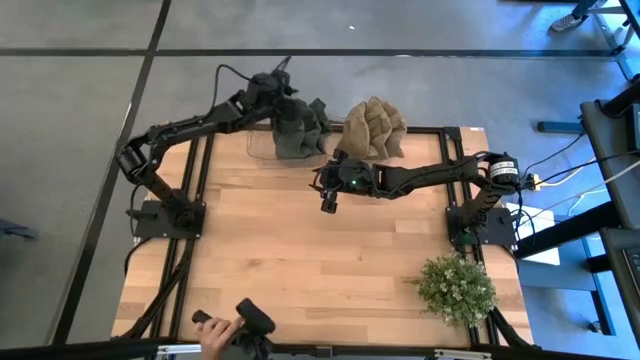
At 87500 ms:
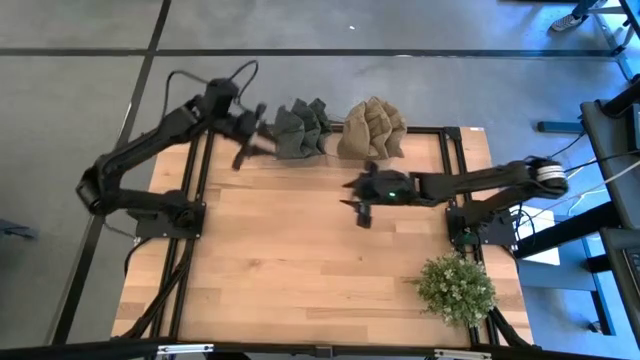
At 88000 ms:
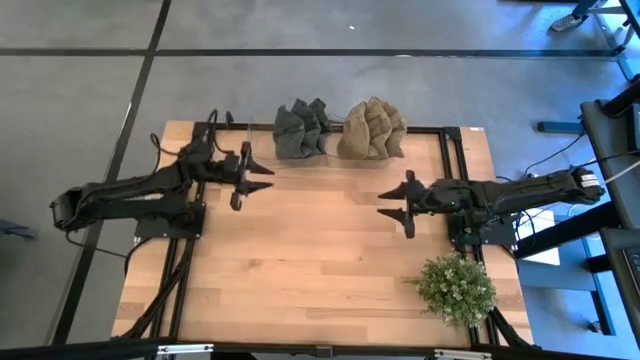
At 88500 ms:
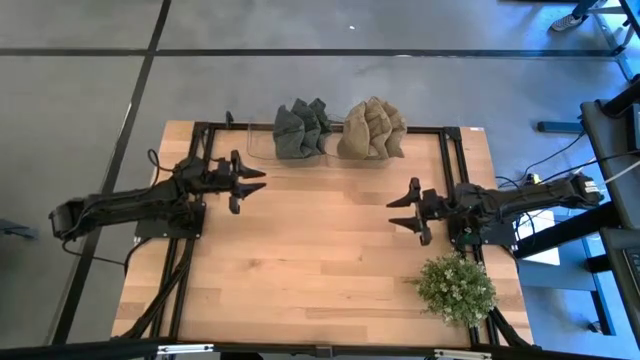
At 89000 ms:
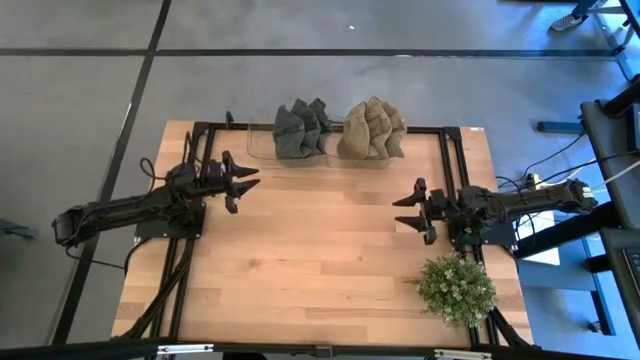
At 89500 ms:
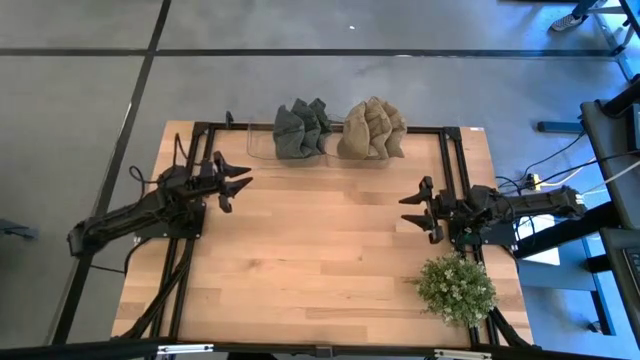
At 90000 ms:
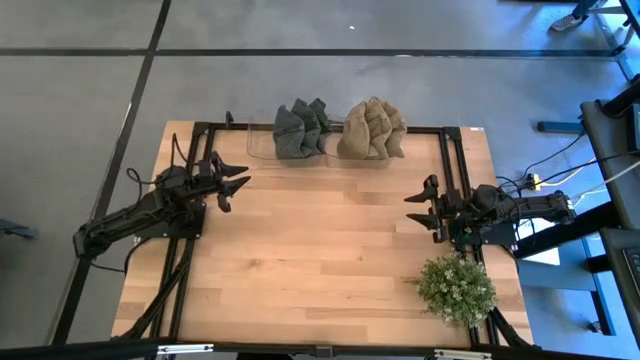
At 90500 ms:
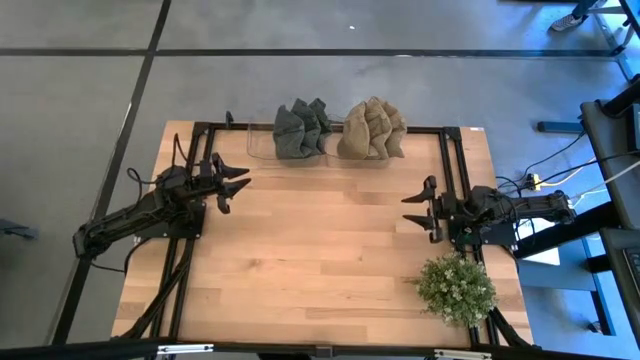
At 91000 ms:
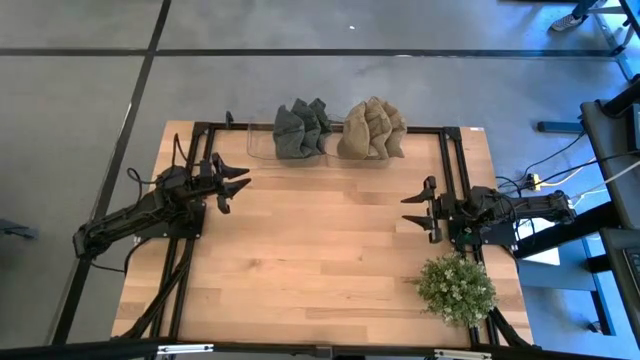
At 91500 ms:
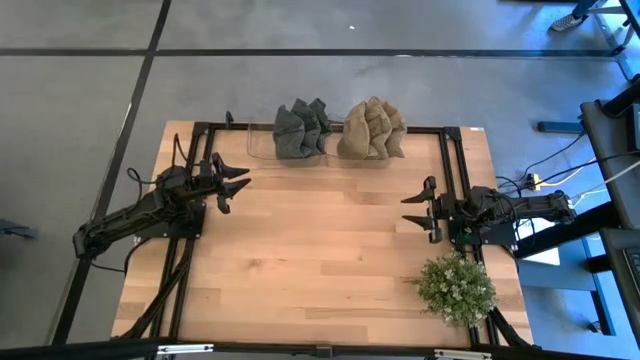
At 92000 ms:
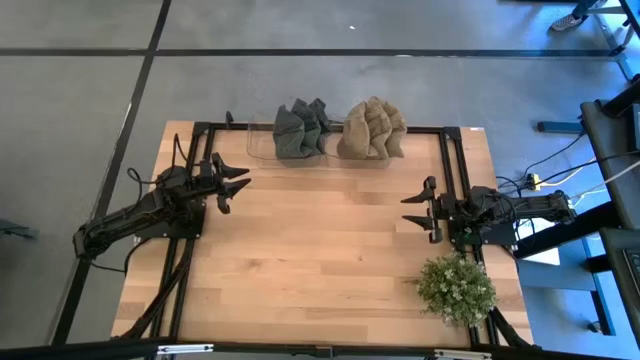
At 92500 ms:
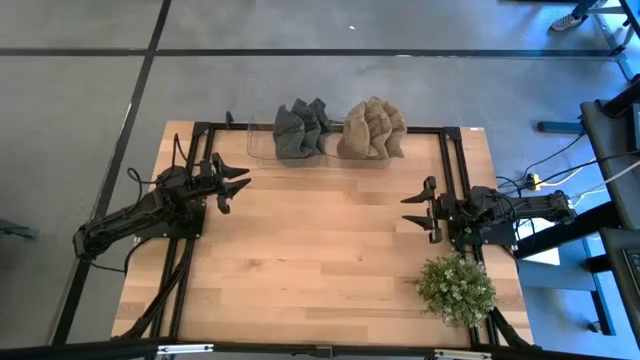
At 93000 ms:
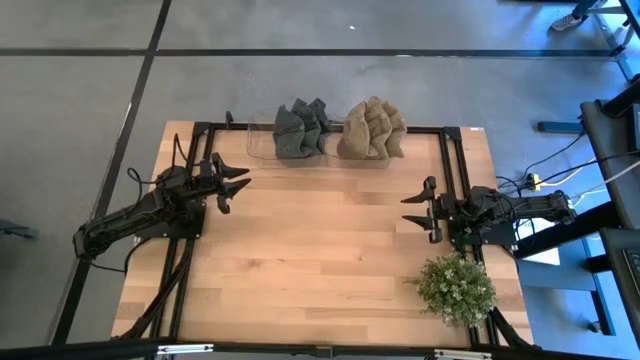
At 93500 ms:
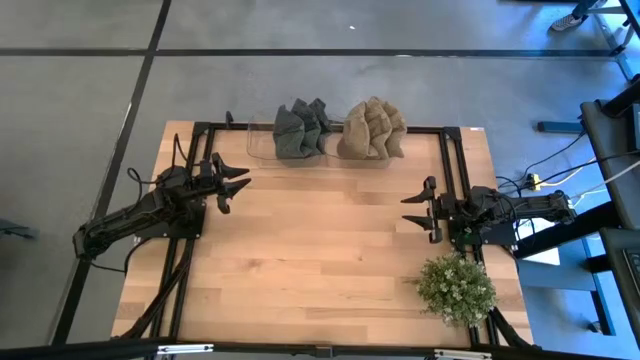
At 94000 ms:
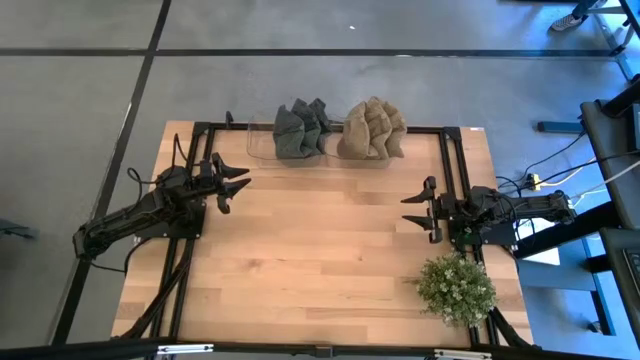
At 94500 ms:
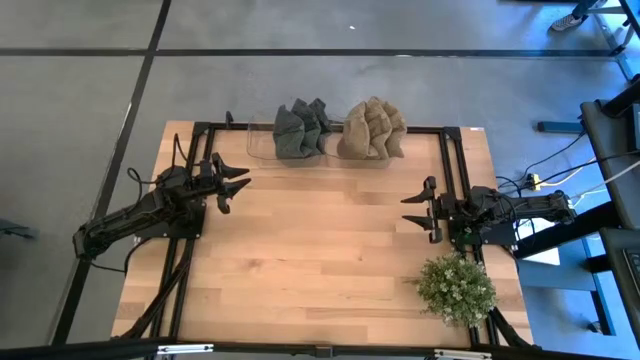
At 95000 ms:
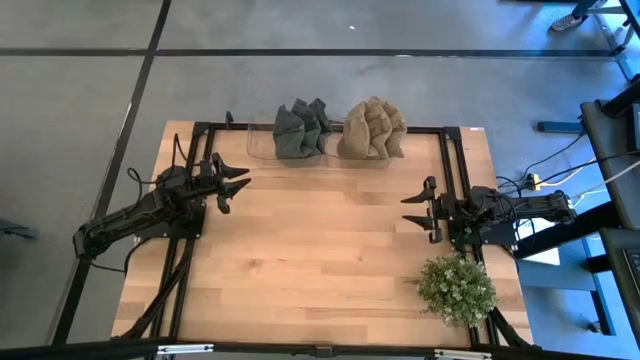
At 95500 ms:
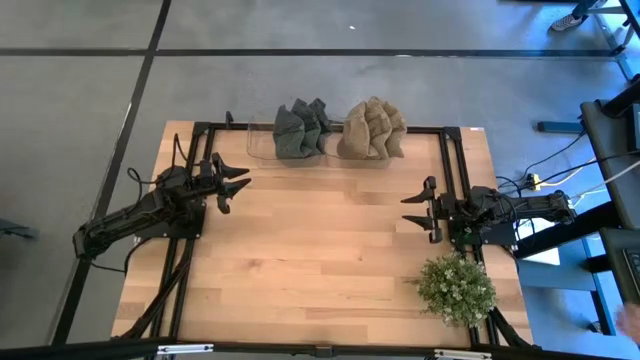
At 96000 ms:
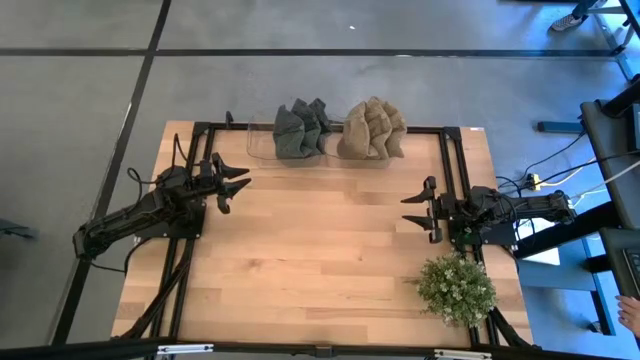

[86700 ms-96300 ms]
Task: Pick & Place hat
Return to Home Position

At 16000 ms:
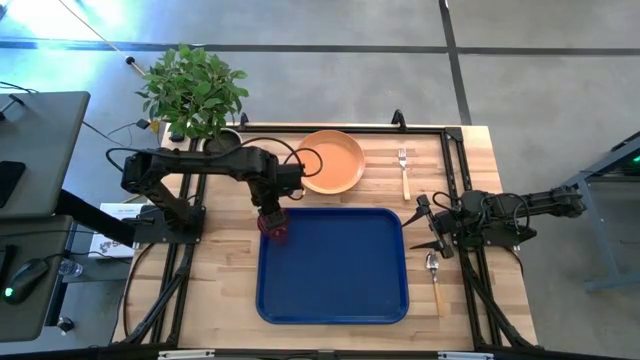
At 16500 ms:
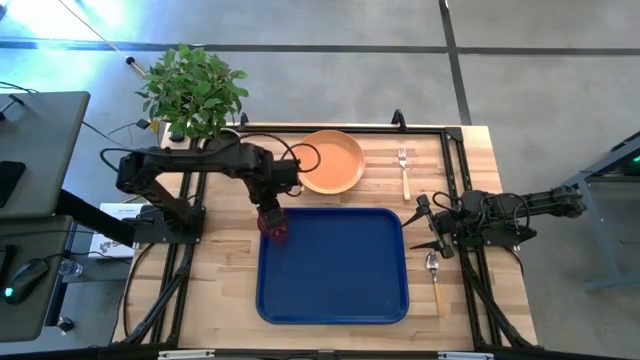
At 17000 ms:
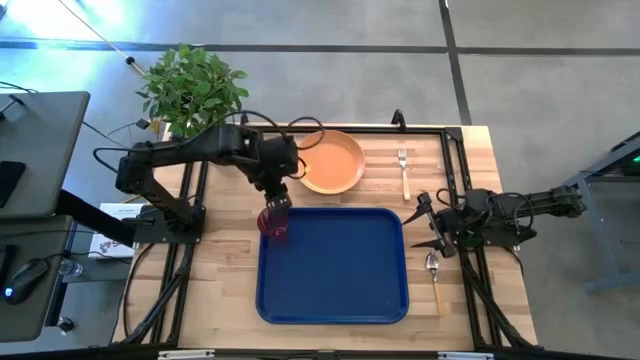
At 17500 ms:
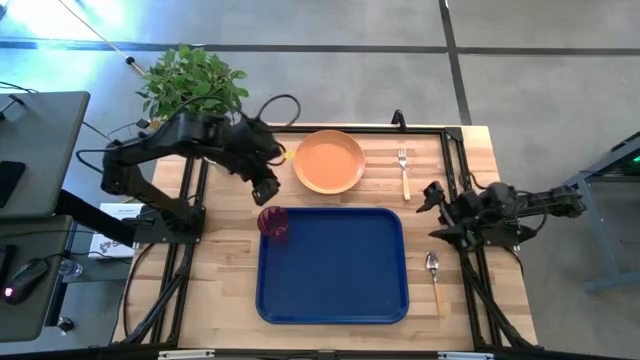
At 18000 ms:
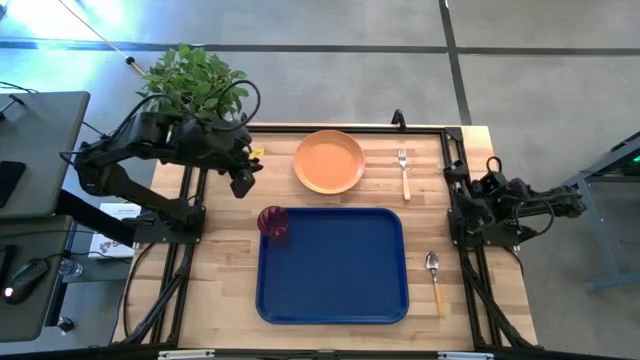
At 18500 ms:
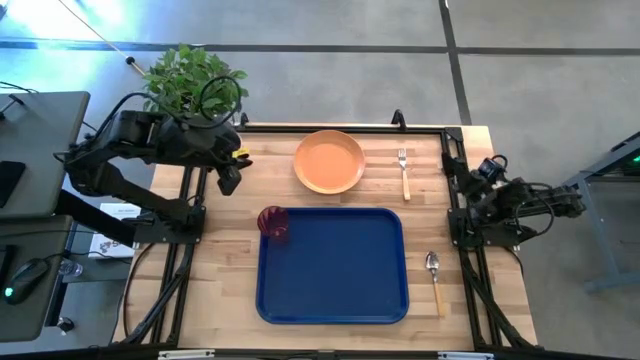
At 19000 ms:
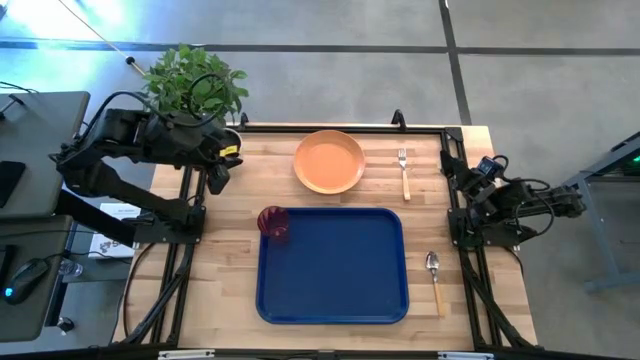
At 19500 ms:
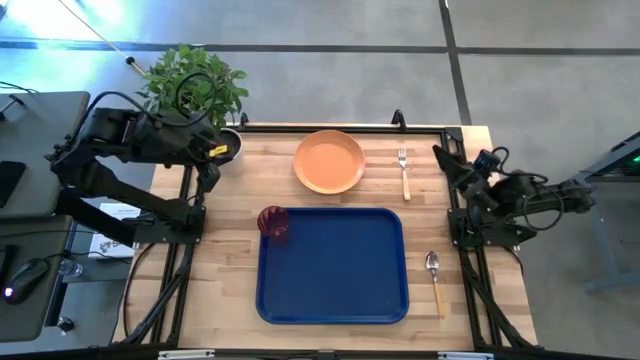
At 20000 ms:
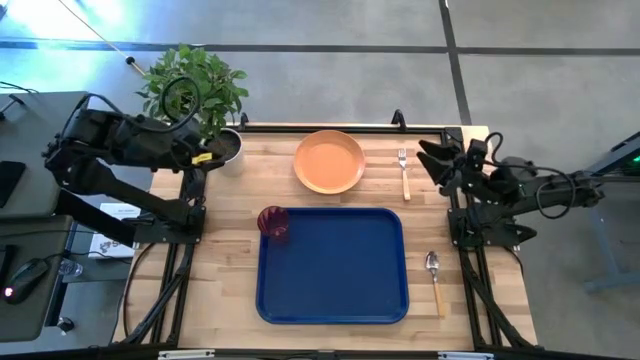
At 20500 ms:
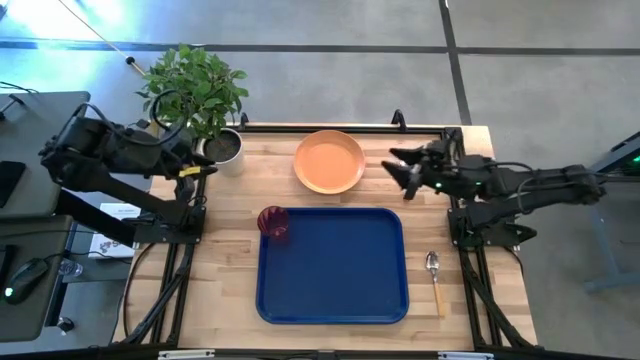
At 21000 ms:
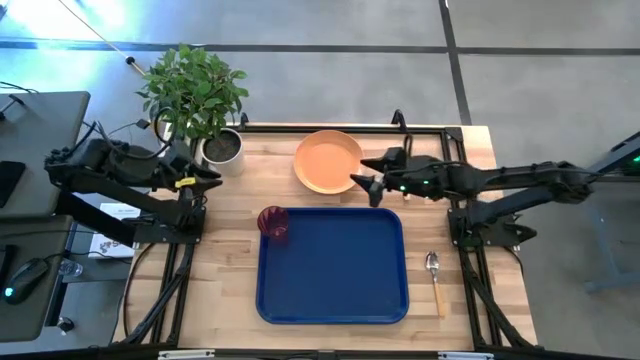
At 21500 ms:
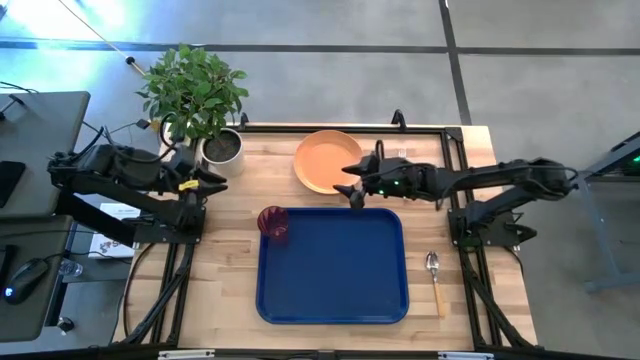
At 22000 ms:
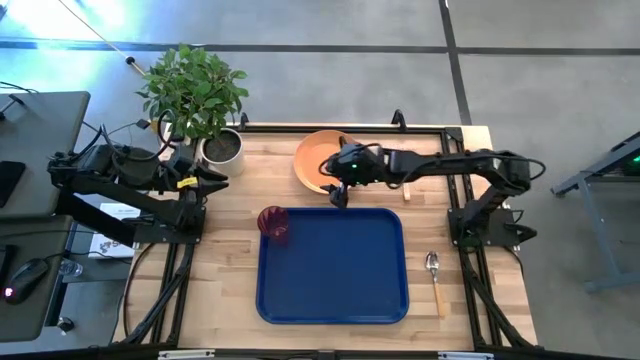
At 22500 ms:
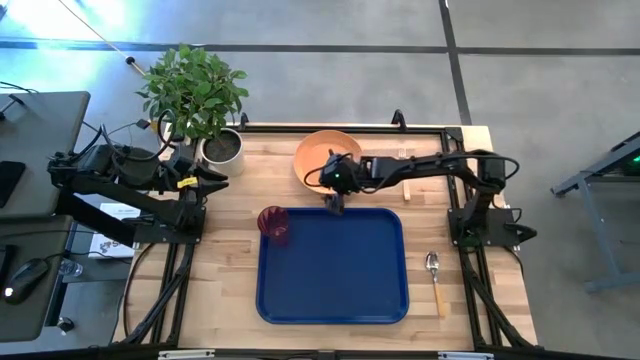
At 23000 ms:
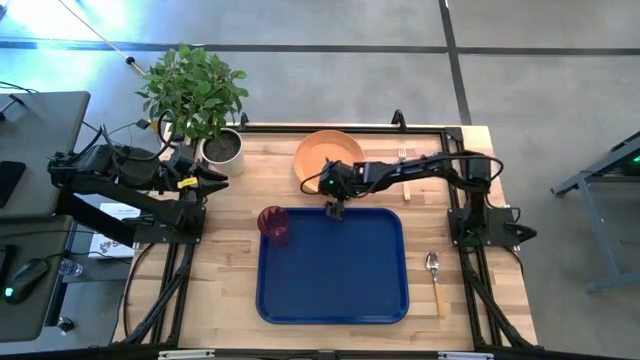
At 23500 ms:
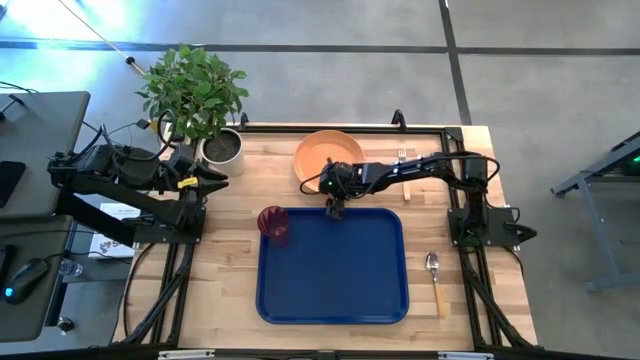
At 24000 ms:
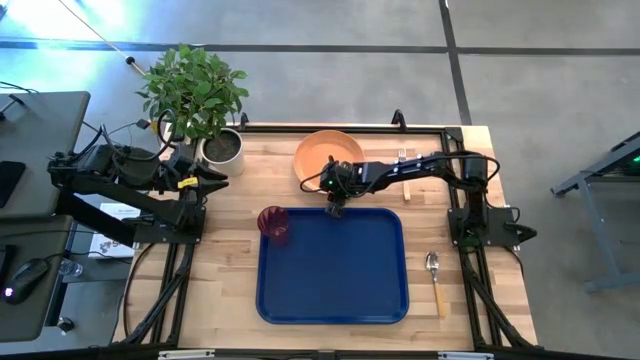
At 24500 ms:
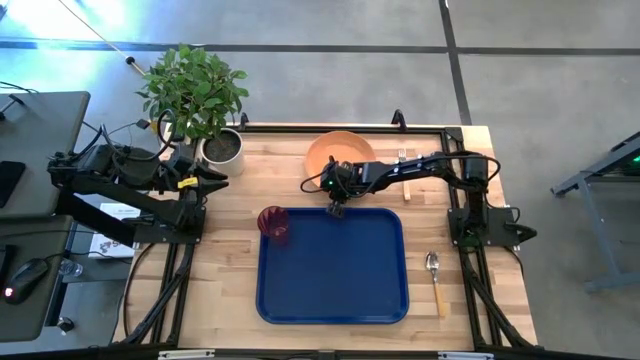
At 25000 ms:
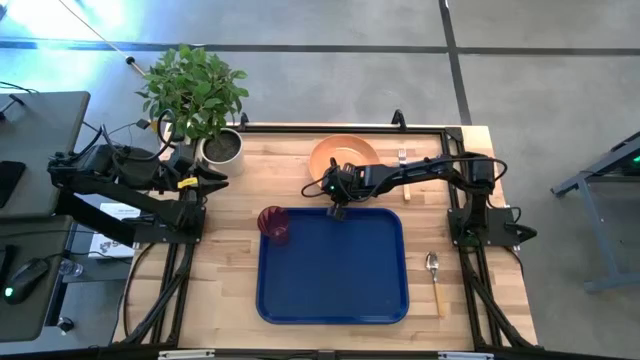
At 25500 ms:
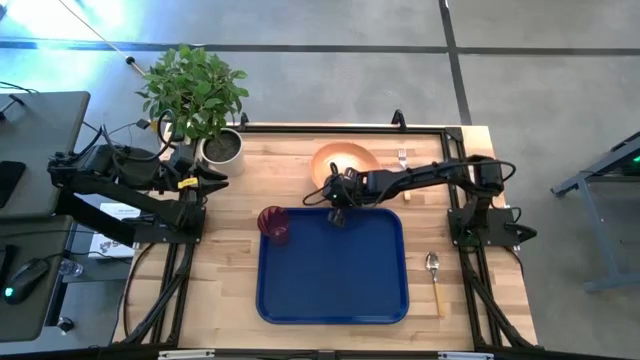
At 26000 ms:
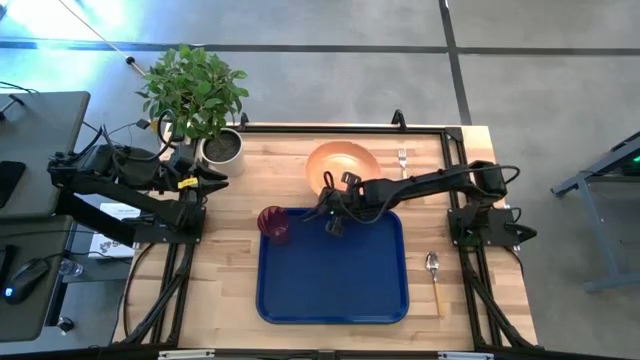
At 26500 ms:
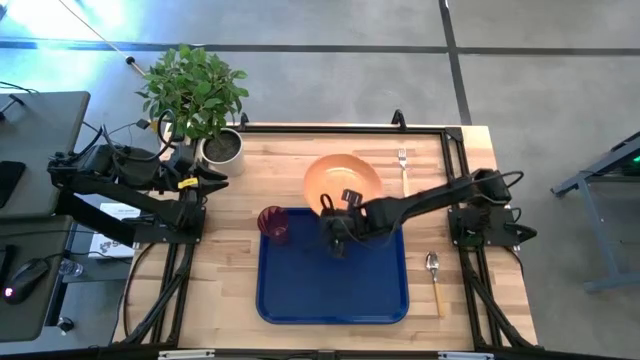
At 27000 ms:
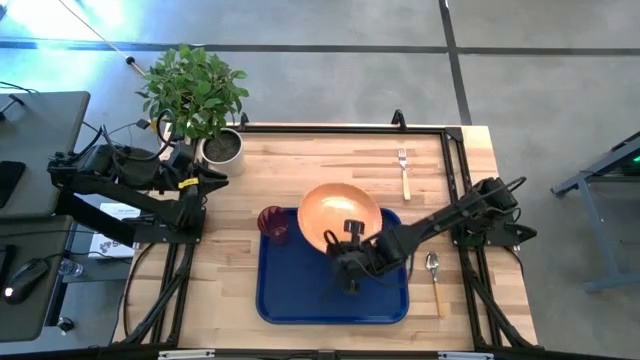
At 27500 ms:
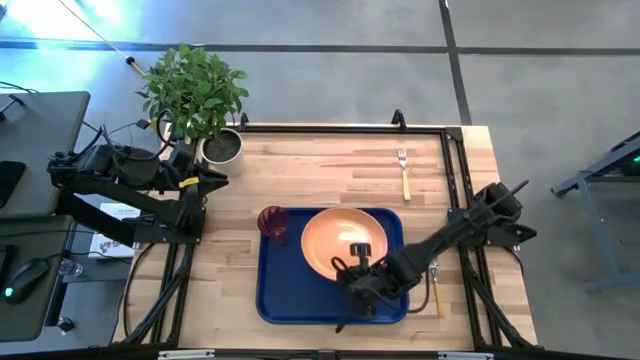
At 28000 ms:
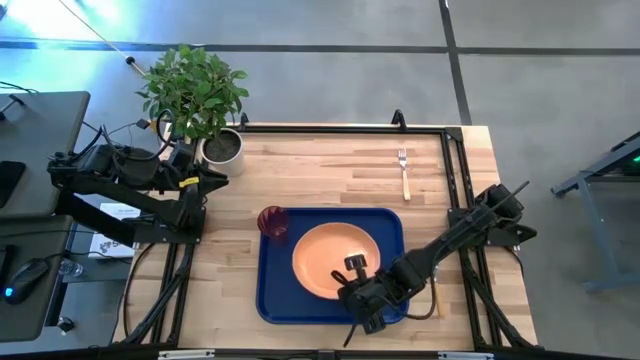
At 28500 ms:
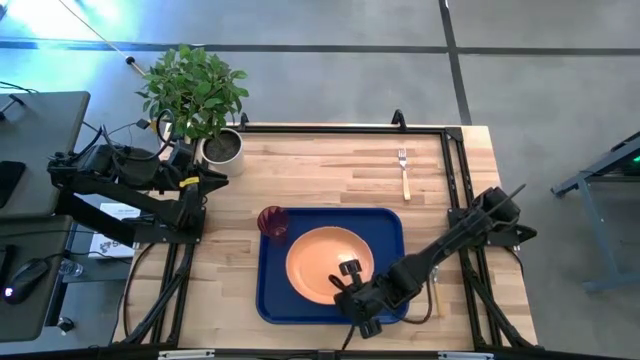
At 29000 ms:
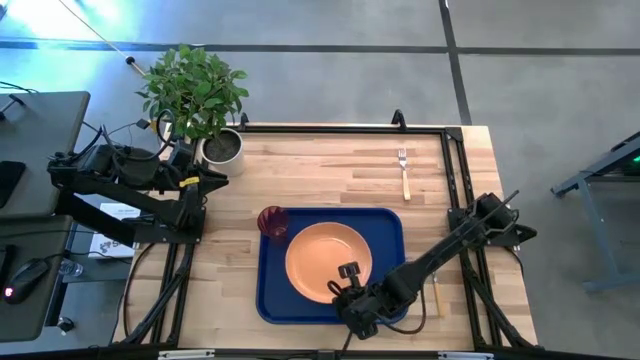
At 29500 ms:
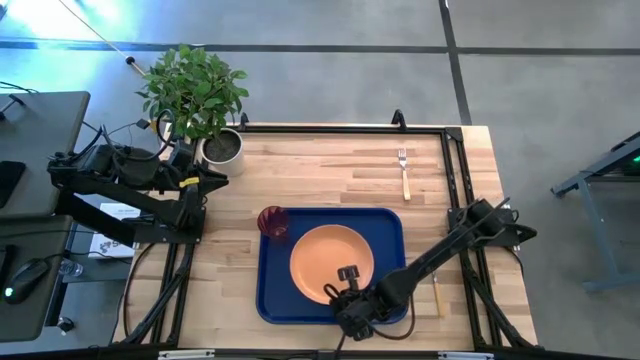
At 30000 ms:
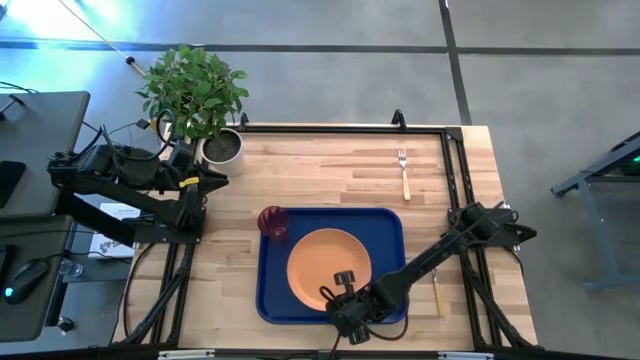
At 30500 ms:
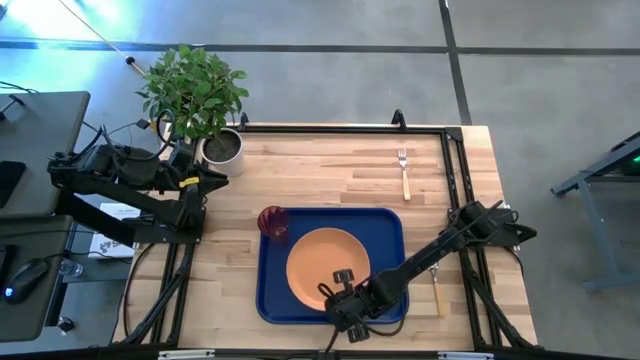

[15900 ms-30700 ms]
Task: Pick and place plate/cup/fork/spoon on tray
Put the orange plate on the bottom right of the red cup
